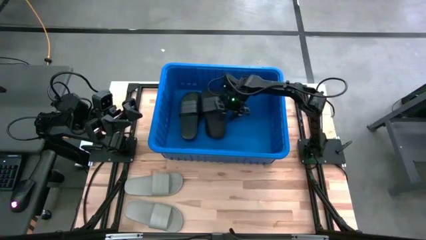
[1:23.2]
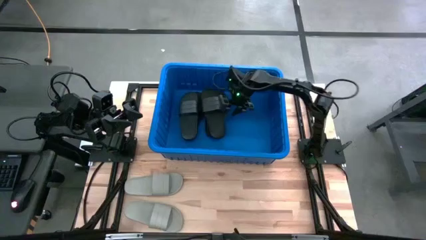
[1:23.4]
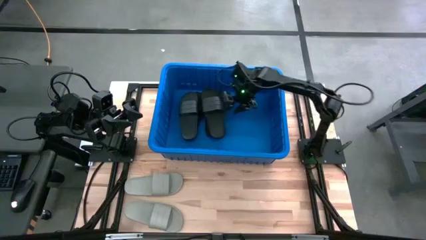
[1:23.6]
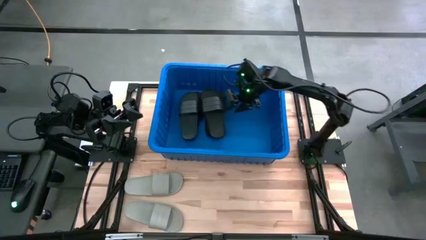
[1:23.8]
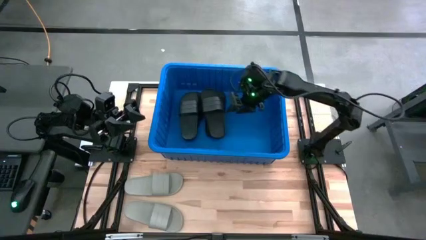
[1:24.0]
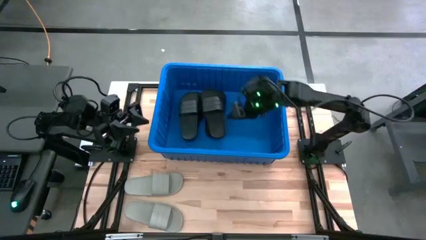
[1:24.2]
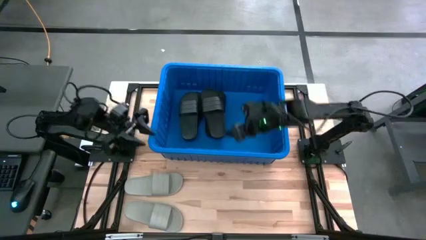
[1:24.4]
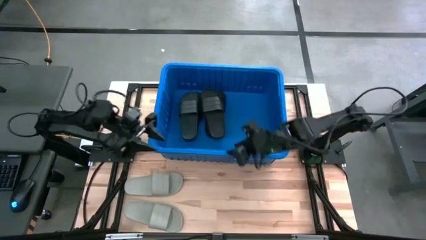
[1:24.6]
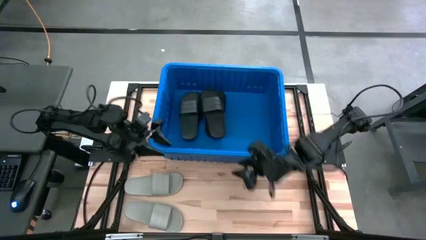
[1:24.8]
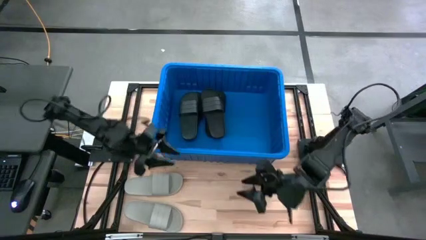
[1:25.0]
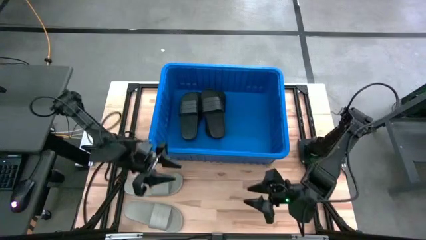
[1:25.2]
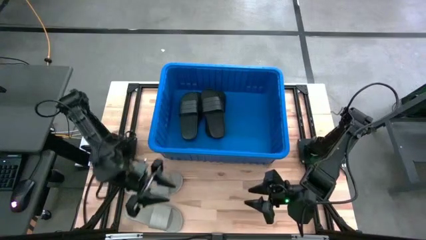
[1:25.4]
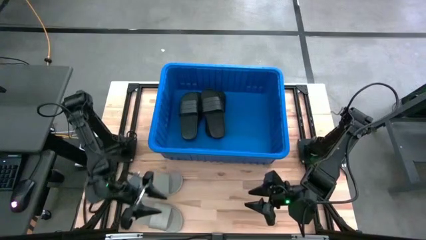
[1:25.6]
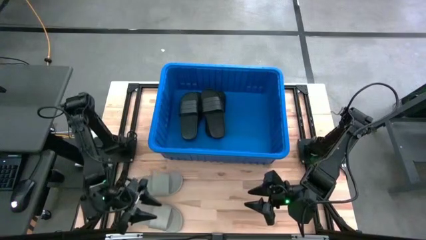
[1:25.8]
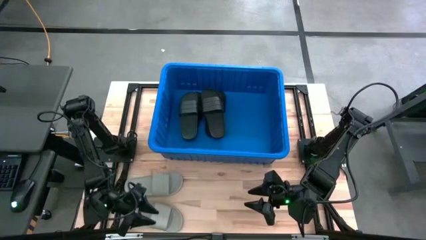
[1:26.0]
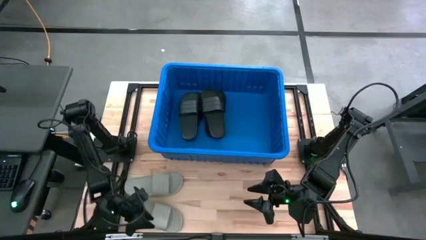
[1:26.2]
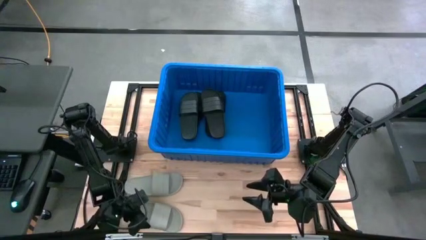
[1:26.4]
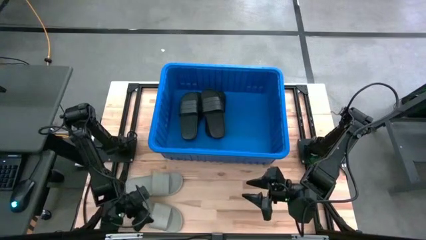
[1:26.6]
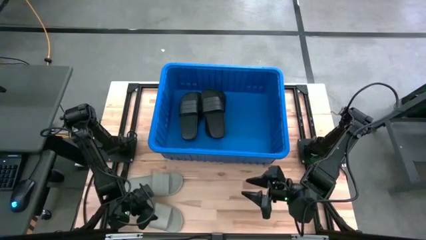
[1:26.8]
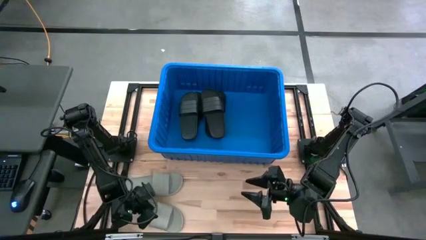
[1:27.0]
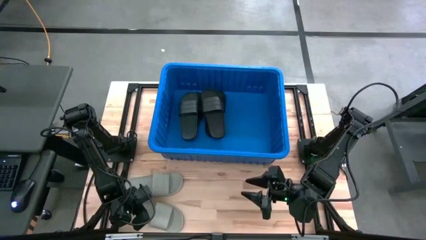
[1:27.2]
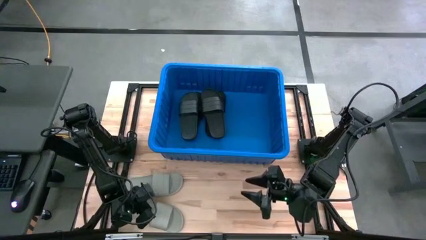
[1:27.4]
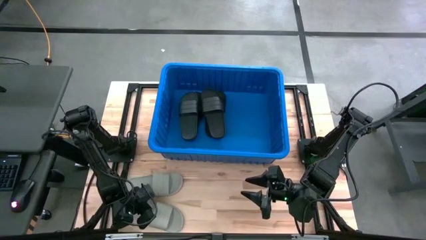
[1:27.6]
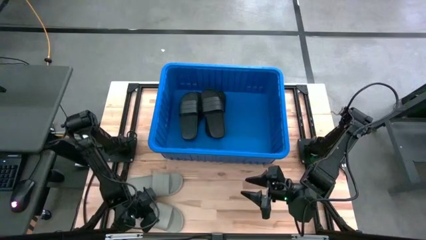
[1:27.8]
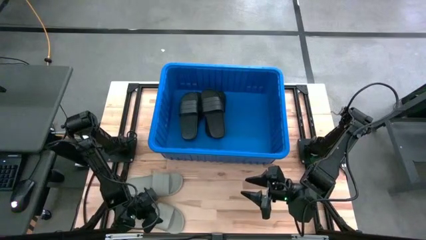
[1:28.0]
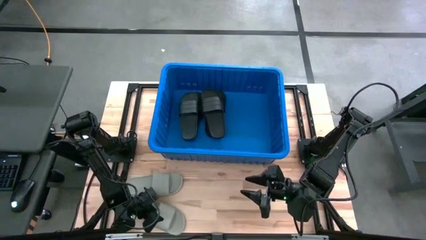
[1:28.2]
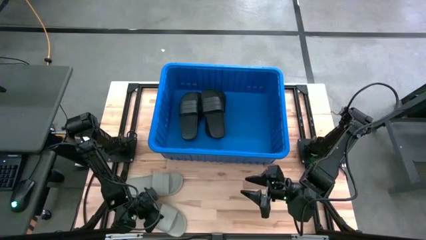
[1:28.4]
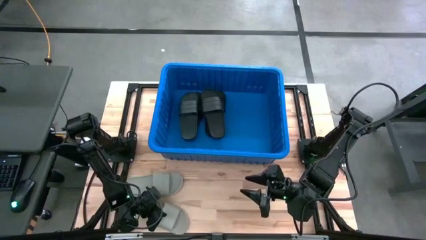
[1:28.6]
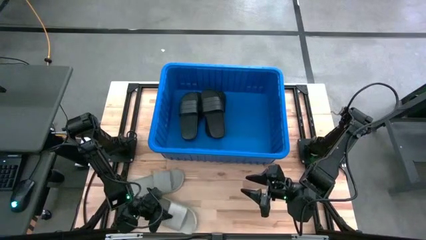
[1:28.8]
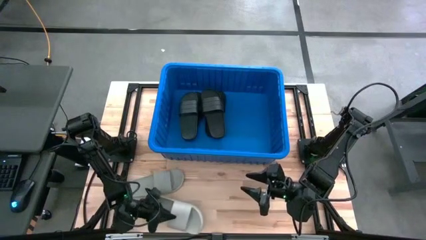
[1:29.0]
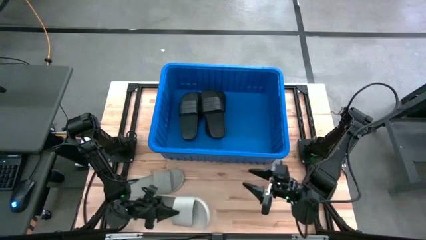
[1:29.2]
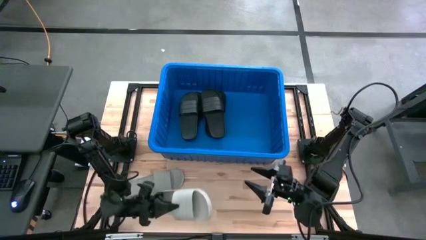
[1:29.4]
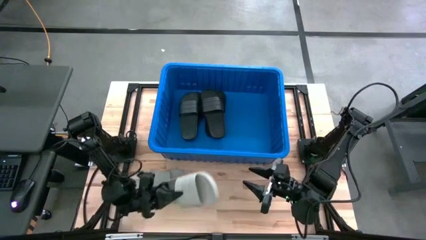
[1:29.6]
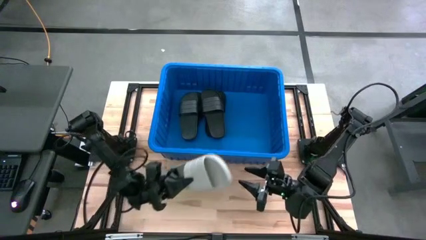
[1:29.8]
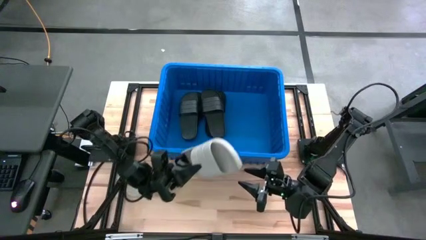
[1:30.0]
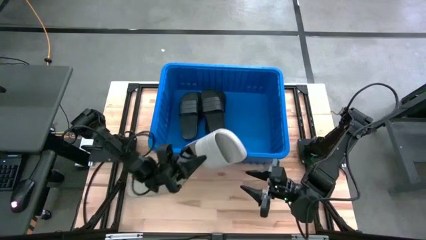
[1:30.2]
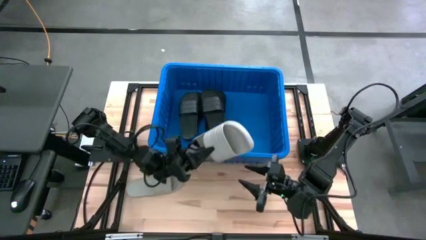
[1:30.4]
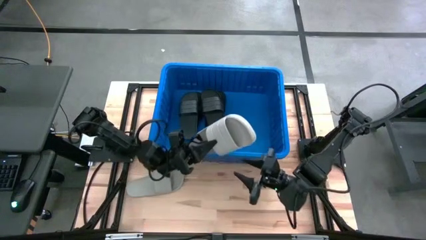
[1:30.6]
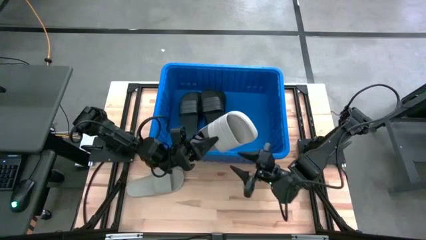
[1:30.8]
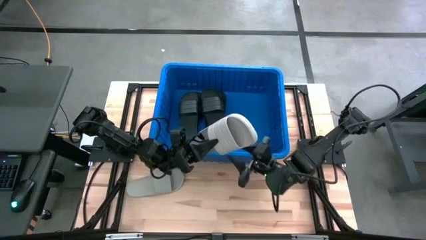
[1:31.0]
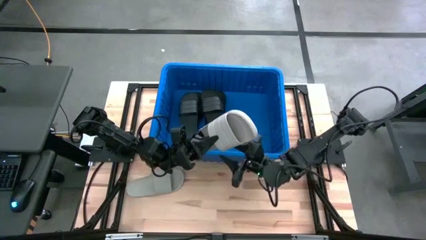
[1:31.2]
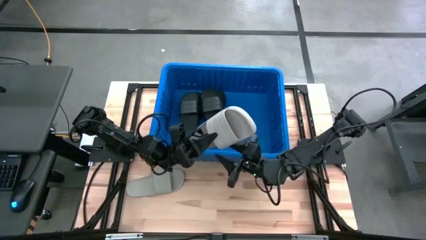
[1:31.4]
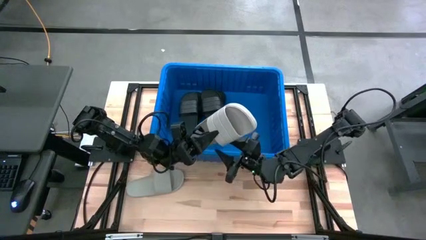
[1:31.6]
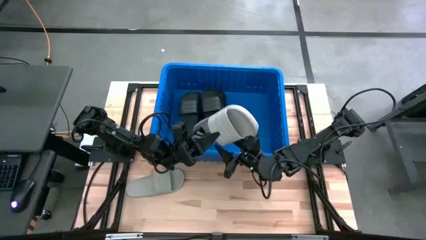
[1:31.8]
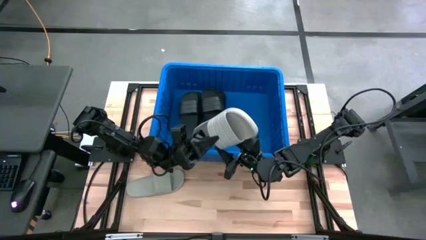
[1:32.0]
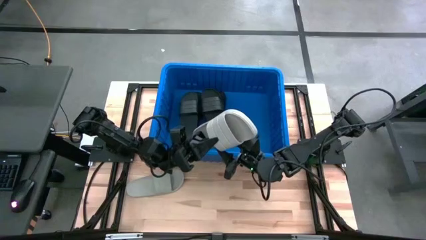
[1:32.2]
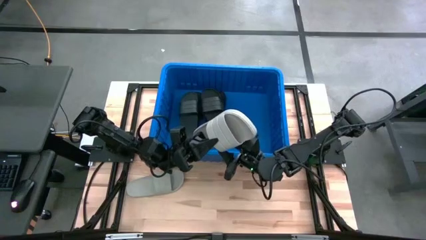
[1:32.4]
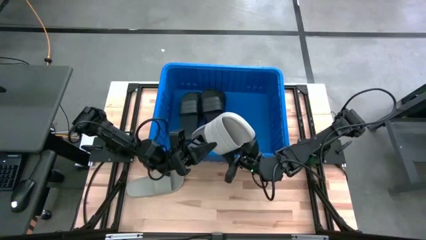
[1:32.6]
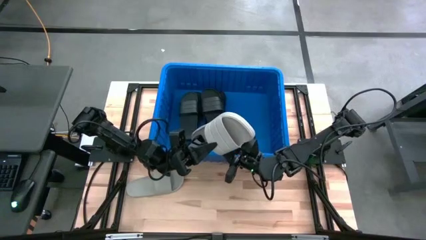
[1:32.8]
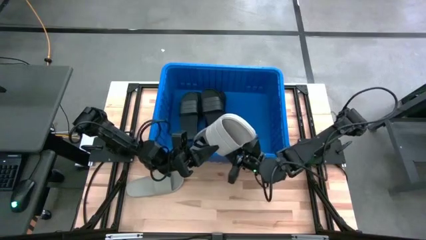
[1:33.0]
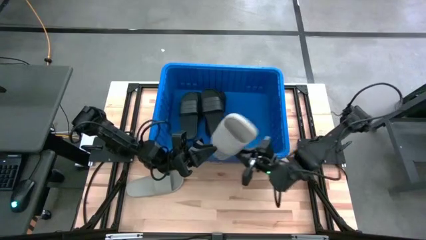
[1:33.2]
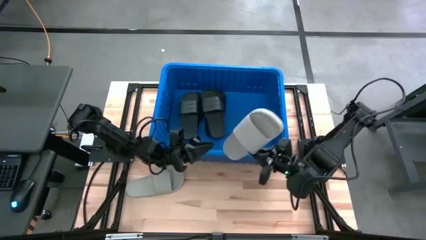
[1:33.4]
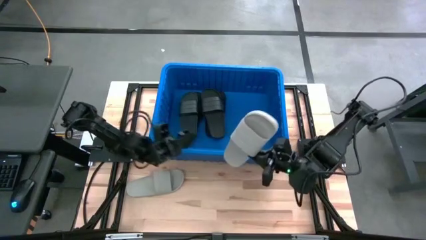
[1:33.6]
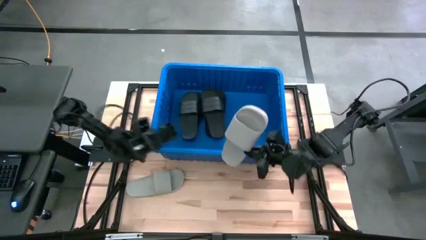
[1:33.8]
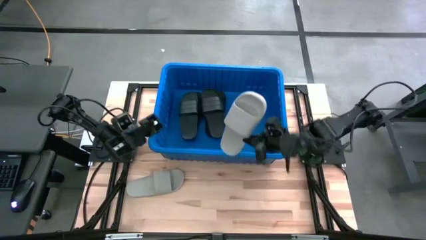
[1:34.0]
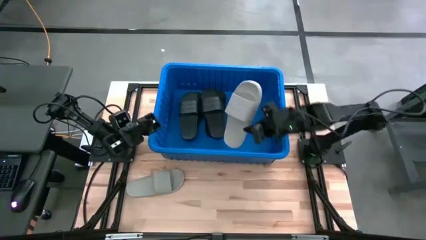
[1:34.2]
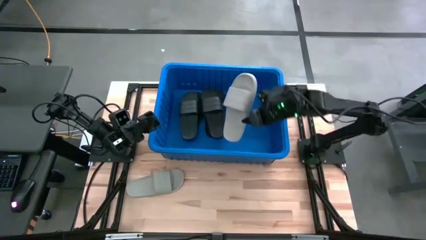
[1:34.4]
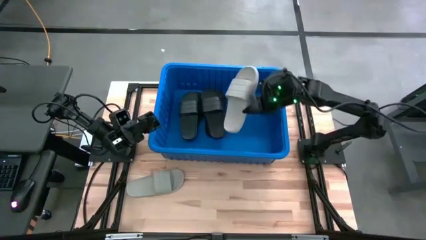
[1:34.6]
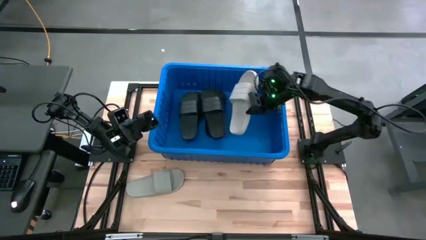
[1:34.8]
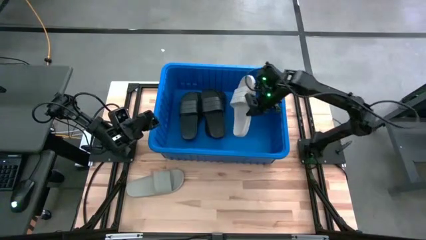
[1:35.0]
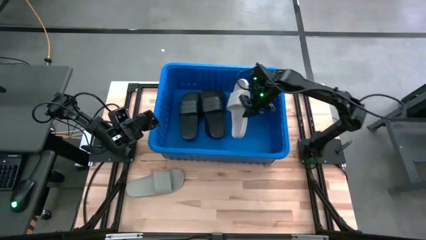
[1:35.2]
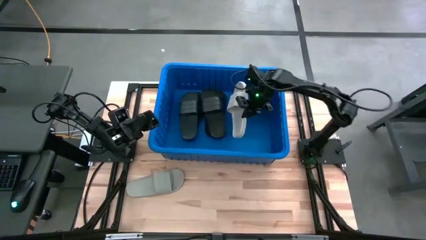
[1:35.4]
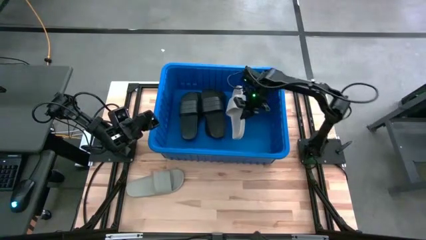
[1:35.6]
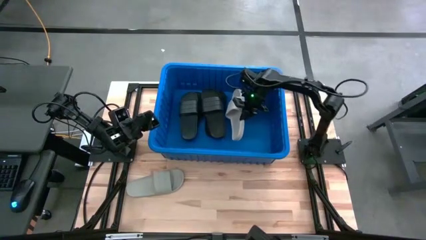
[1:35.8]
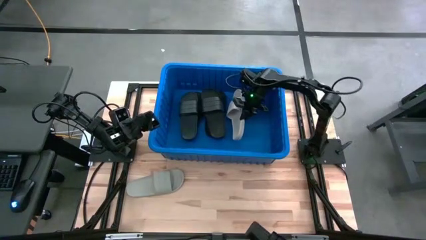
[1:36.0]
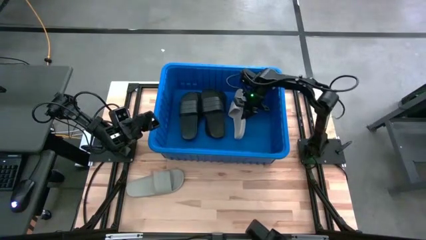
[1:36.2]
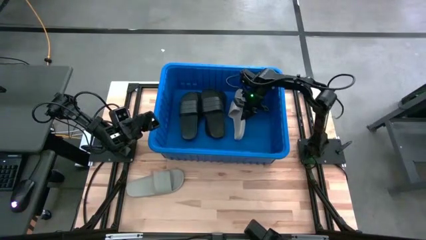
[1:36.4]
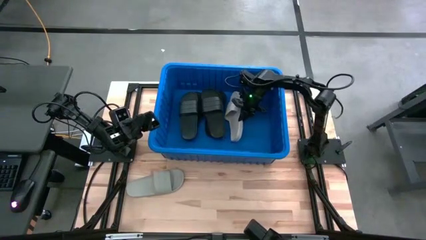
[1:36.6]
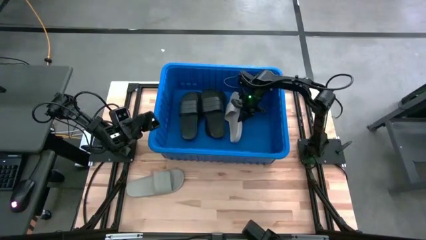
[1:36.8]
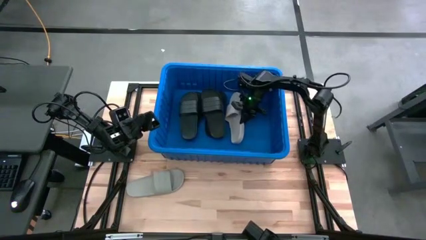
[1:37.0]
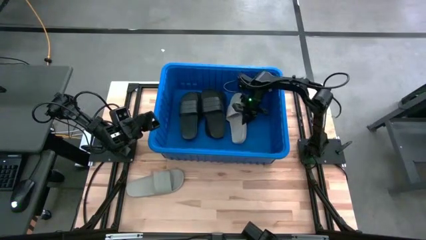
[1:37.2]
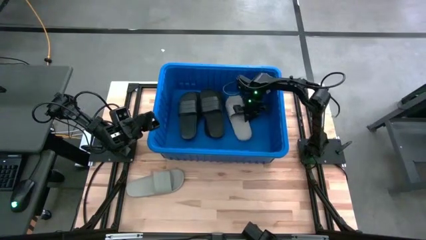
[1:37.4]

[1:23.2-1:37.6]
Task: Pick and place slides into bin
Put the bottom gray slide into the blue bin
